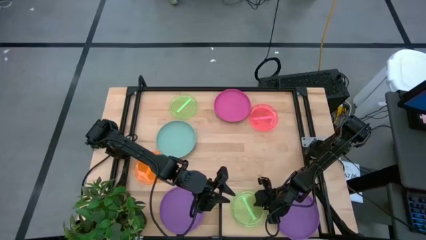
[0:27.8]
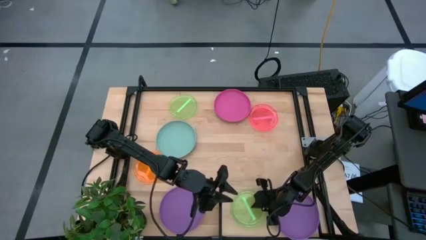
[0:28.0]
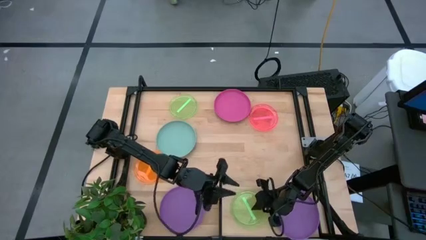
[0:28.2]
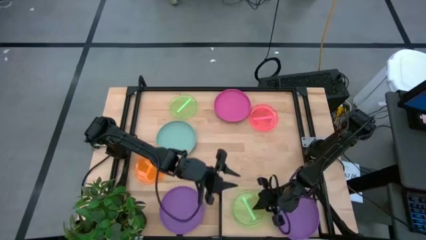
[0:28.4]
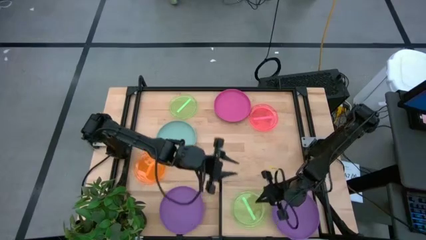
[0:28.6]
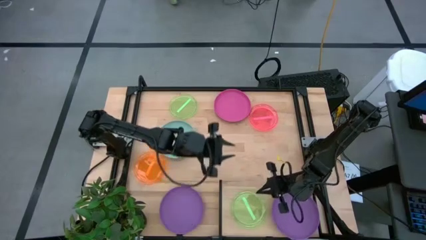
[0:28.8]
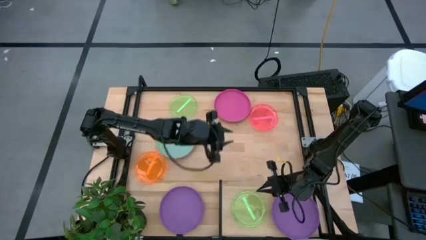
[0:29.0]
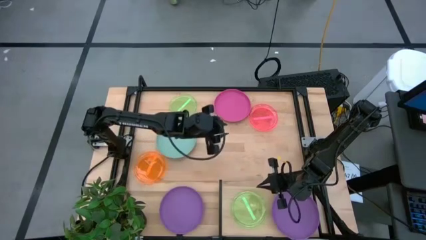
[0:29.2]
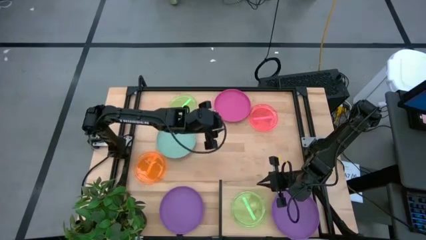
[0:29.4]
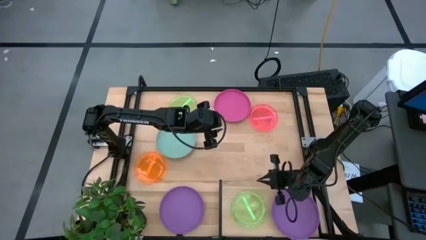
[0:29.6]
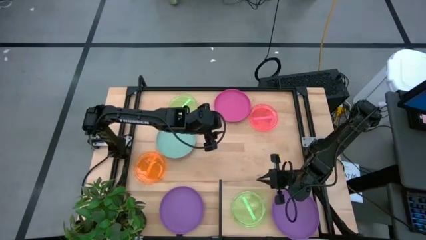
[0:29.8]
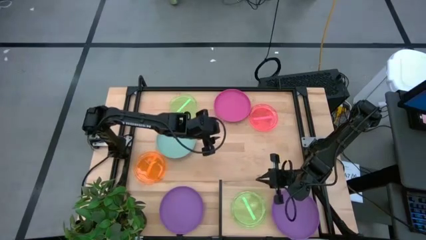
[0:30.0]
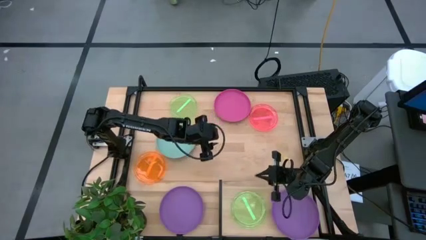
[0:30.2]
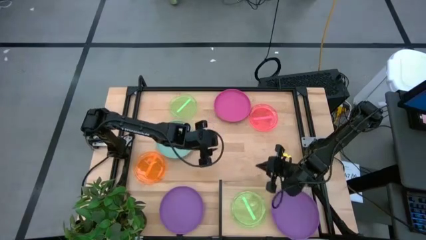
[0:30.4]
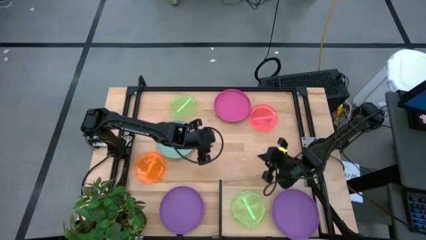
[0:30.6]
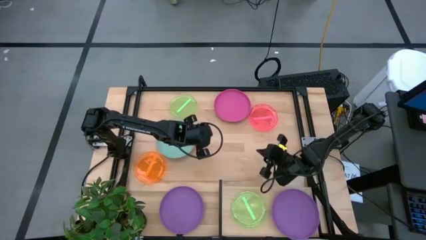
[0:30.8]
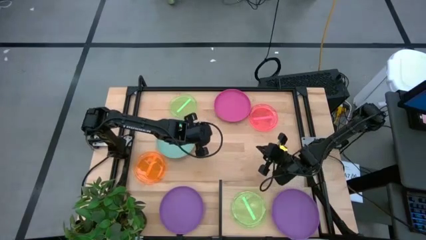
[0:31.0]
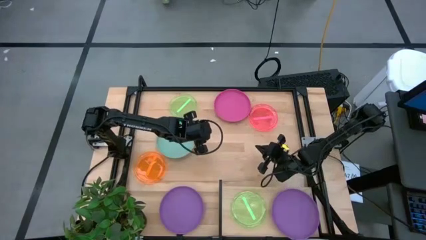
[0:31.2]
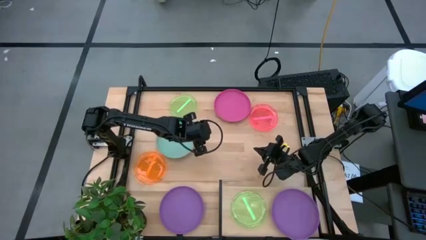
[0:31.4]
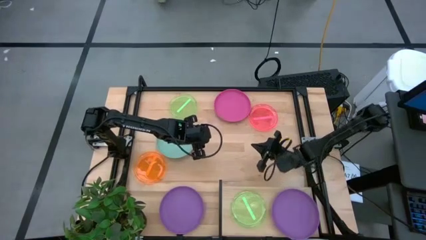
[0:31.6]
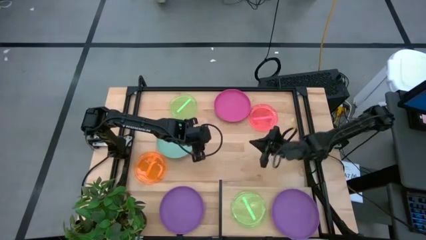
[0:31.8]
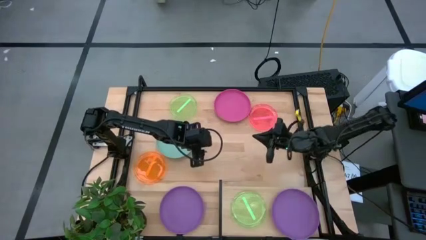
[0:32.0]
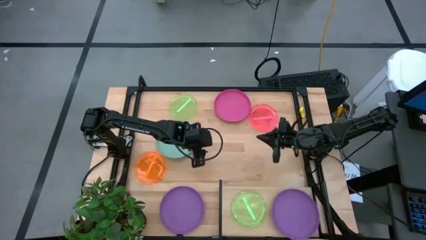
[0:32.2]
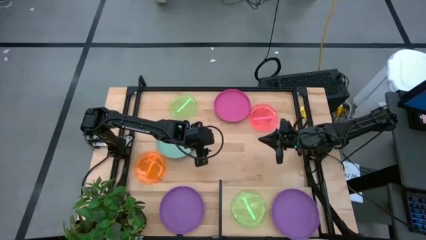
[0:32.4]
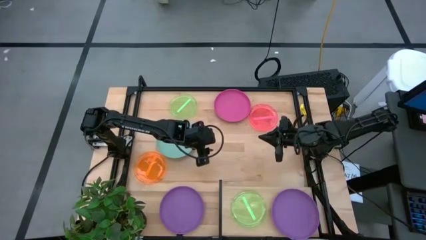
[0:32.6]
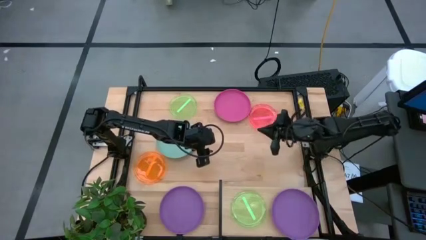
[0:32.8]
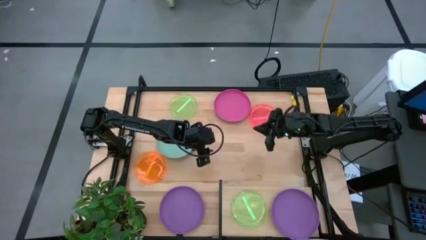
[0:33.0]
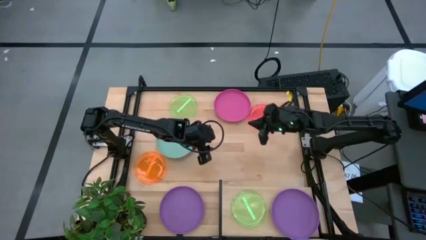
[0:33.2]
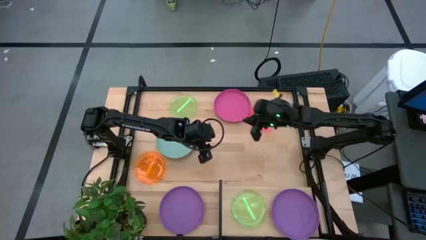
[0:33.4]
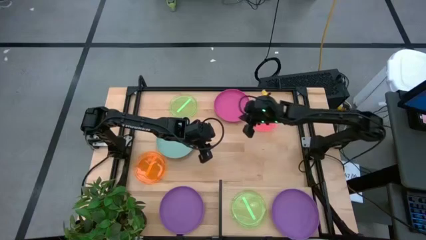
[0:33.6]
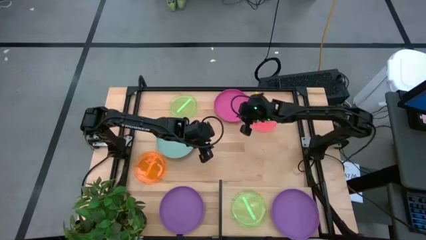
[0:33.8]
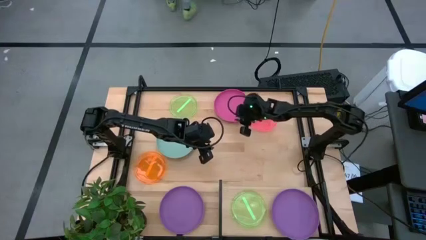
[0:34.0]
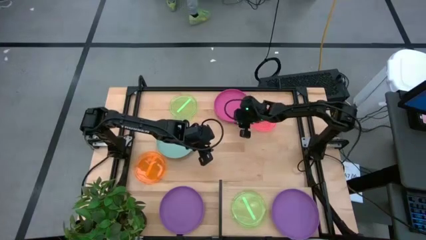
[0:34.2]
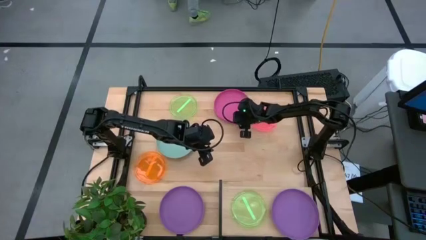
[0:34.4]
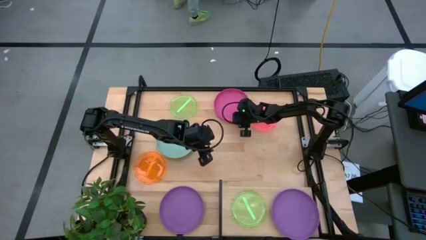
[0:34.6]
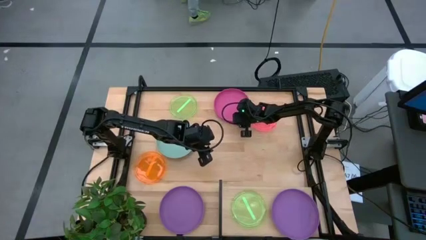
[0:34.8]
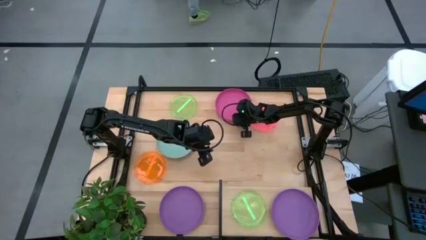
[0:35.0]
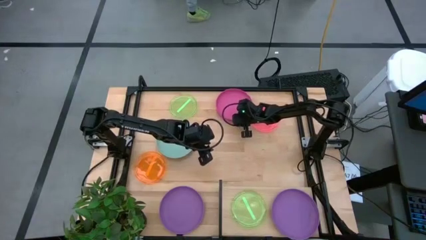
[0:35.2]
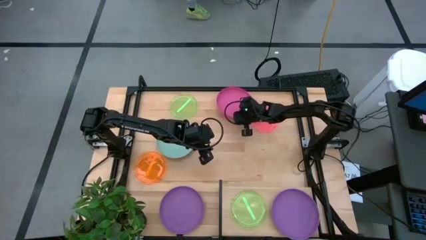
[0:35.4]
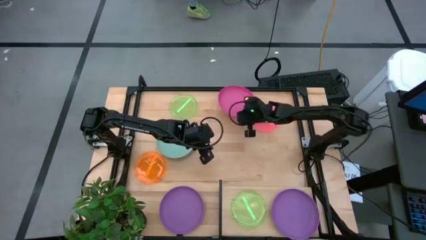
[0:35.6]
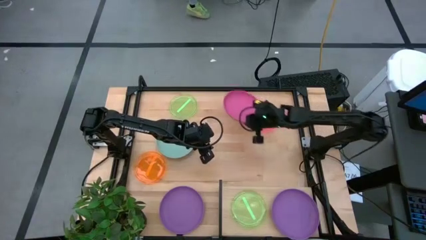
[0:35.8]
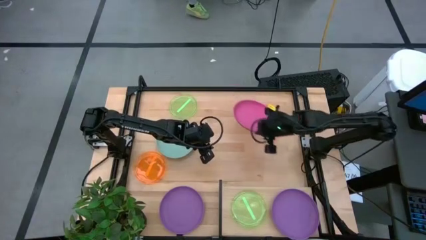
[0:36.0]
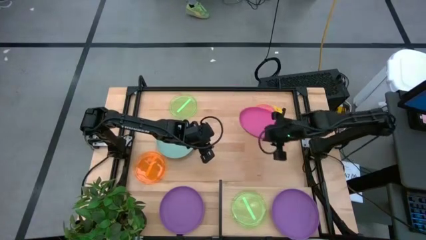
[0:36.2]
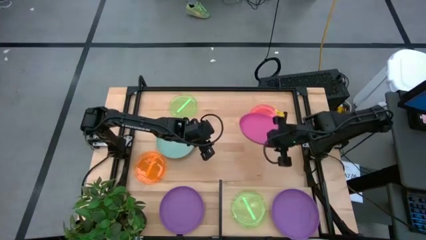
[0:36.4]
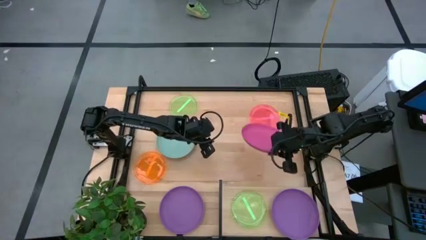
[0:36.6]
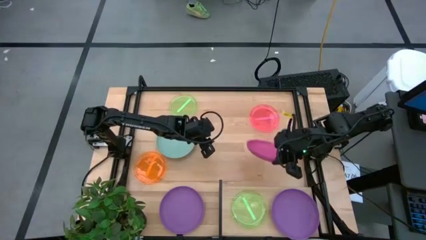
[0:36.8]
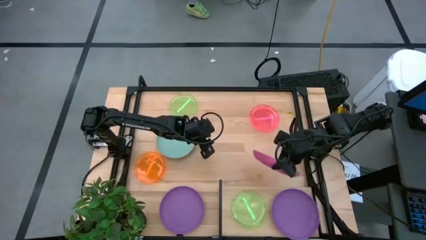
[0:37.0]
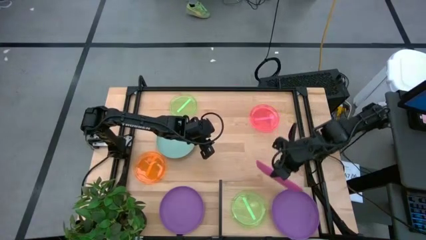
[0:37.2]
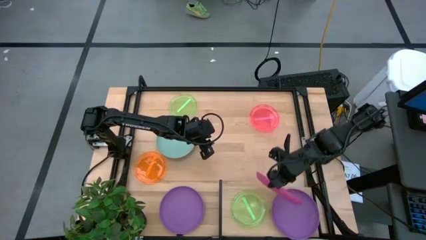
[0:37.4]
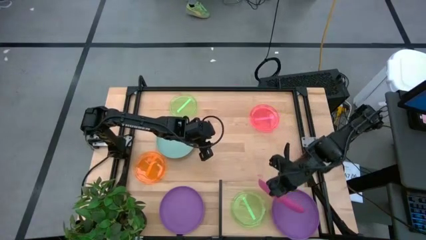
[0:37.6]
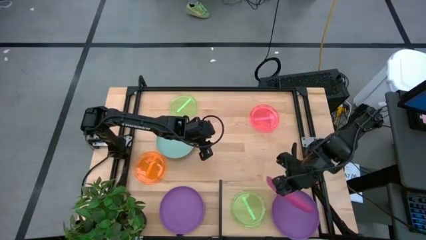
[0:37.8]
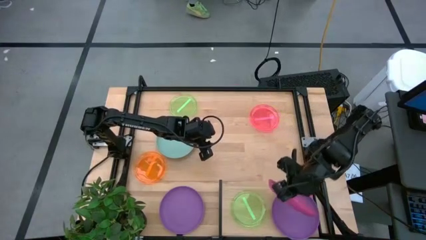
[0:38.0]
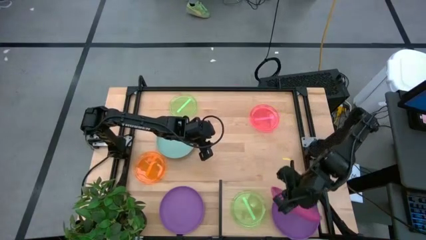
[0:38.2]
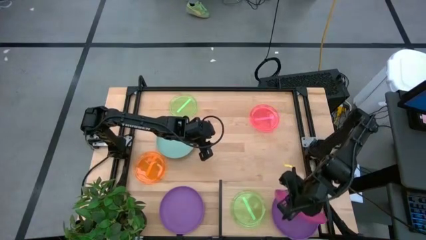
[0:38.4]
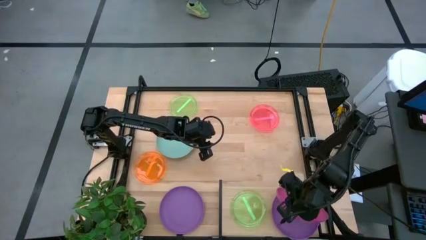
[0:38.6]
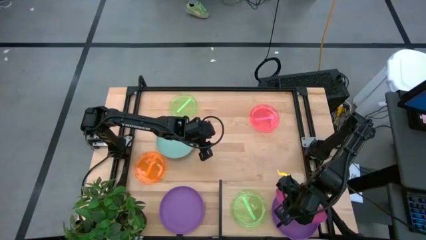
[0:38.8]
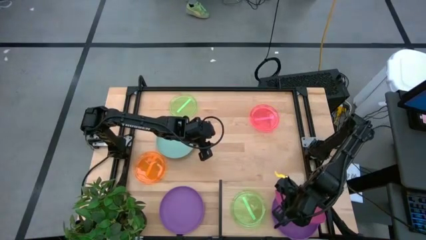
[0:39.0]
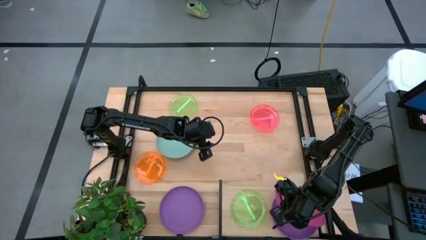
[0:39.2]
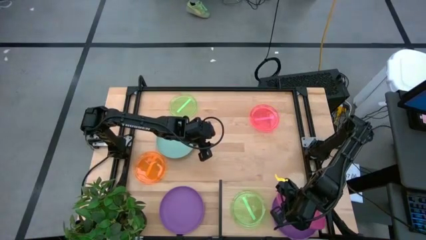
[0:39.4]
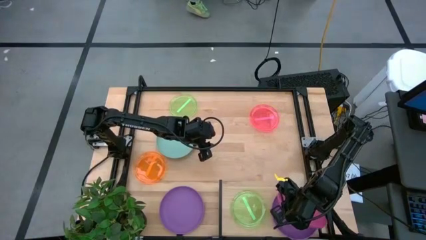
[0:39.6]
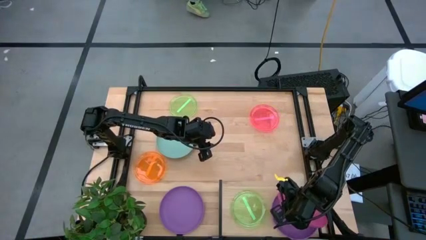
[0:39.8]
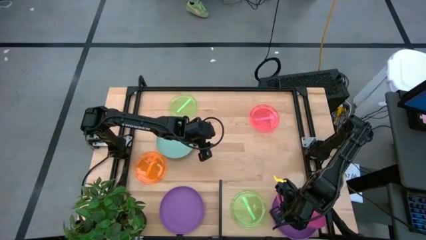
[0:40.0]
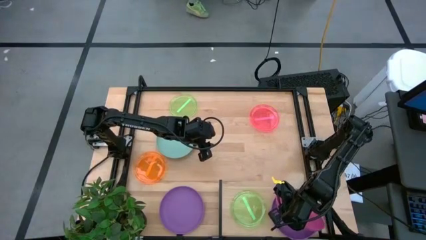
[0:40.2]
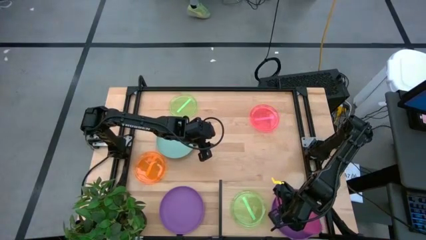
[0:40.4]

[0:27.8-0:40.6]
Task: Place and stack plates onto a shelf
Stack the pink plate on top of the purple plate on the shelf
